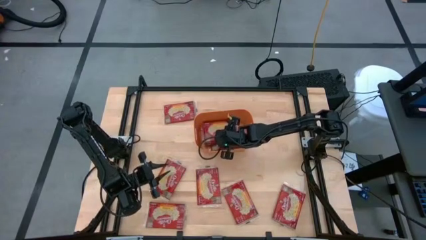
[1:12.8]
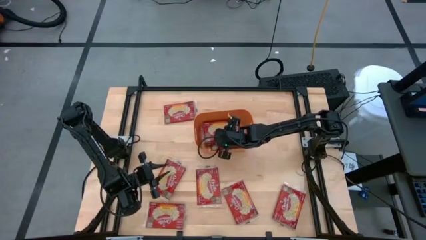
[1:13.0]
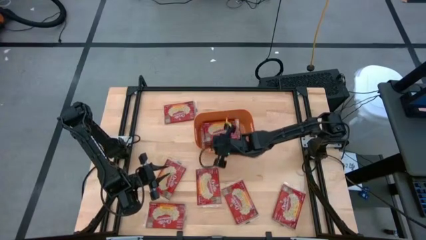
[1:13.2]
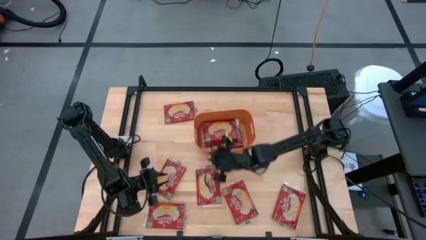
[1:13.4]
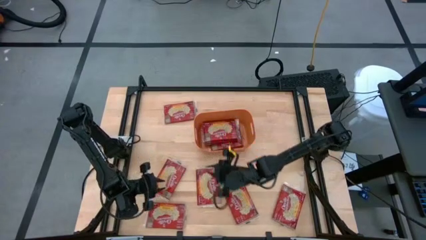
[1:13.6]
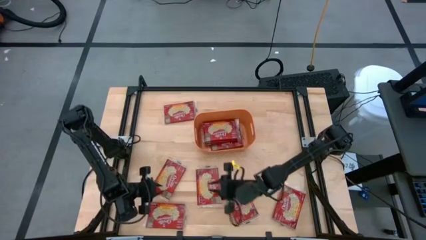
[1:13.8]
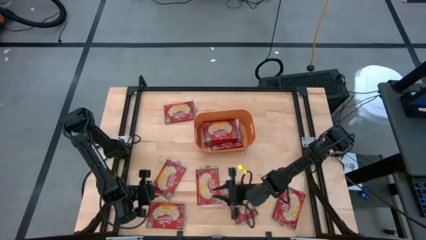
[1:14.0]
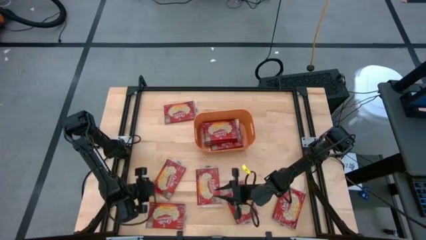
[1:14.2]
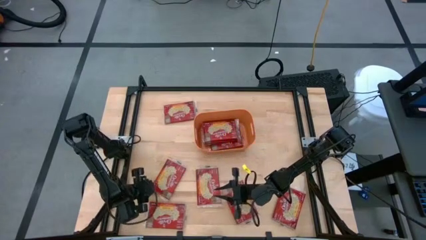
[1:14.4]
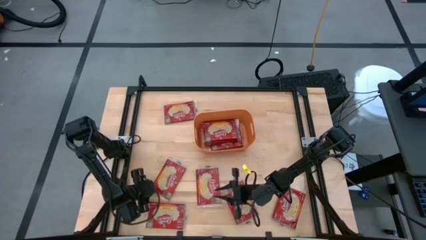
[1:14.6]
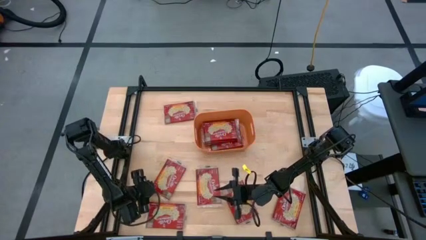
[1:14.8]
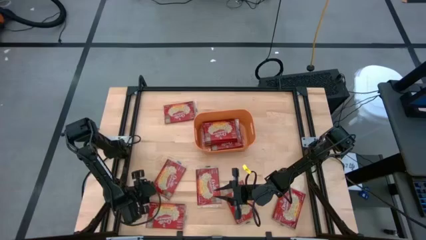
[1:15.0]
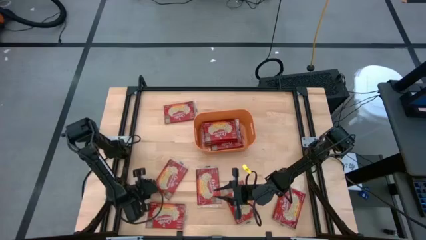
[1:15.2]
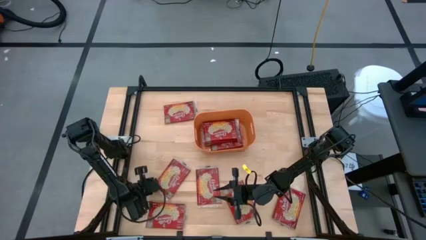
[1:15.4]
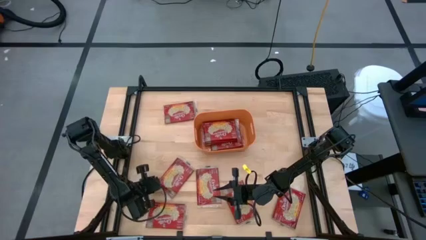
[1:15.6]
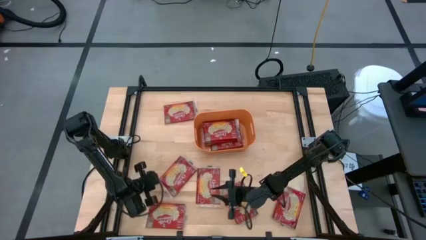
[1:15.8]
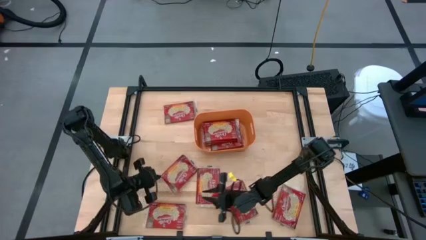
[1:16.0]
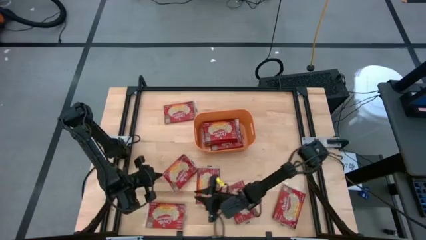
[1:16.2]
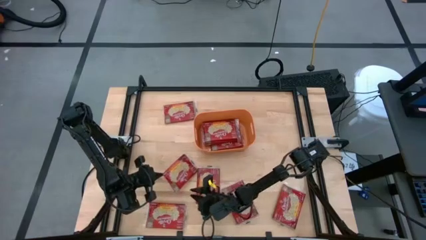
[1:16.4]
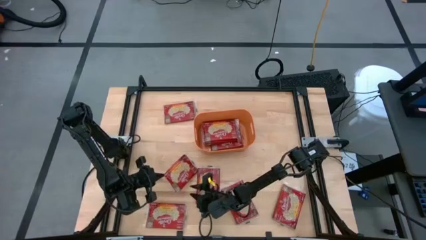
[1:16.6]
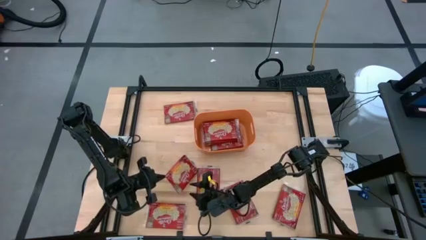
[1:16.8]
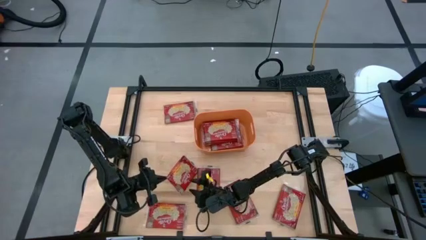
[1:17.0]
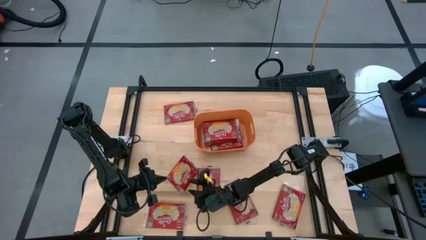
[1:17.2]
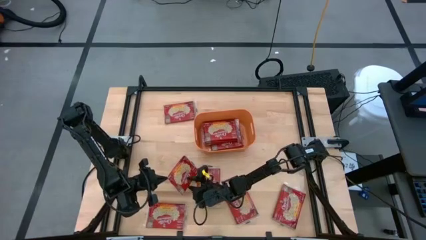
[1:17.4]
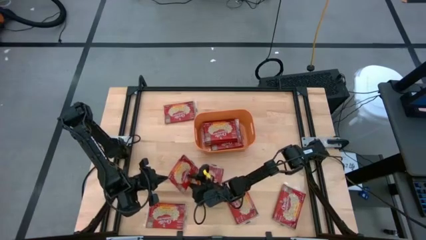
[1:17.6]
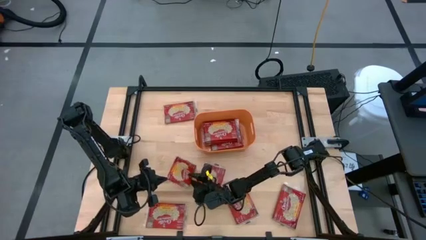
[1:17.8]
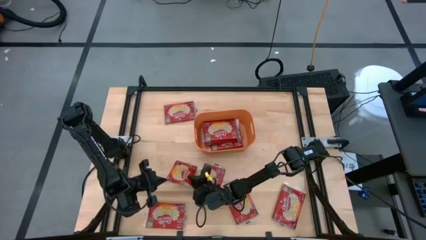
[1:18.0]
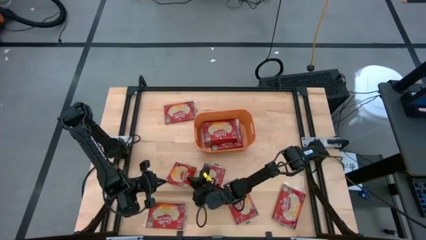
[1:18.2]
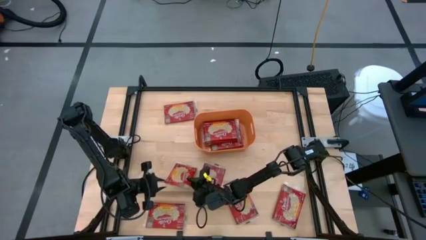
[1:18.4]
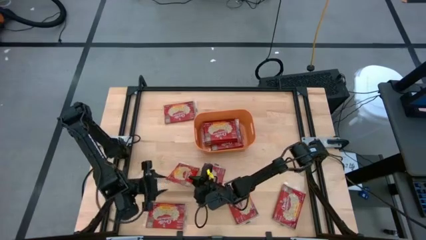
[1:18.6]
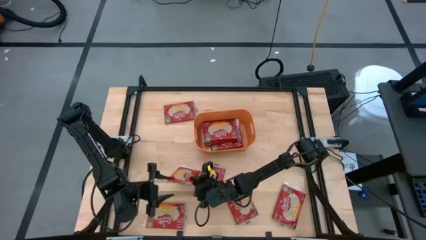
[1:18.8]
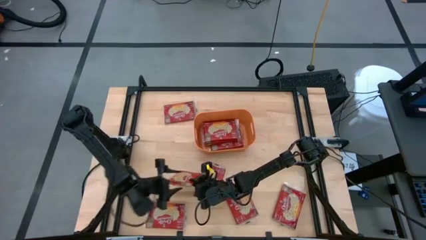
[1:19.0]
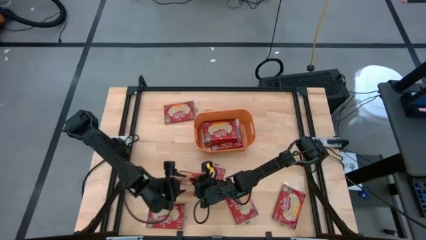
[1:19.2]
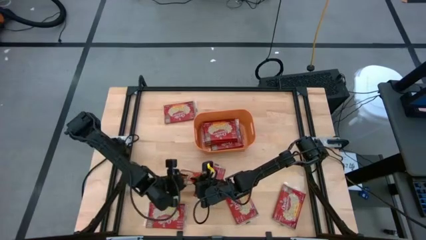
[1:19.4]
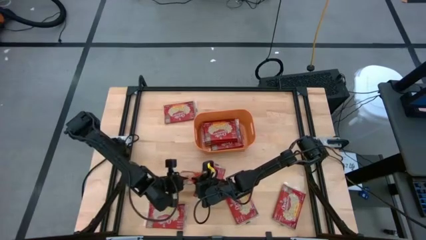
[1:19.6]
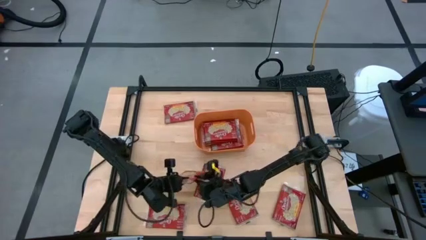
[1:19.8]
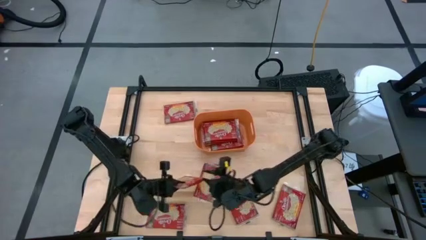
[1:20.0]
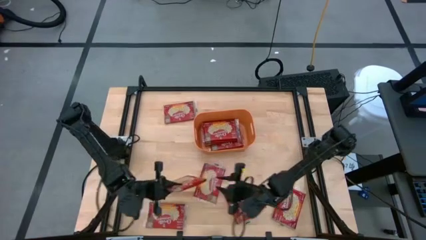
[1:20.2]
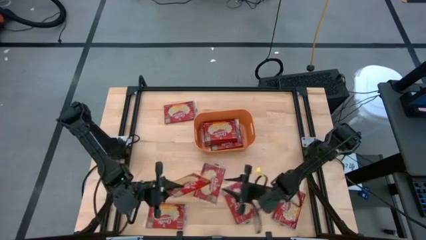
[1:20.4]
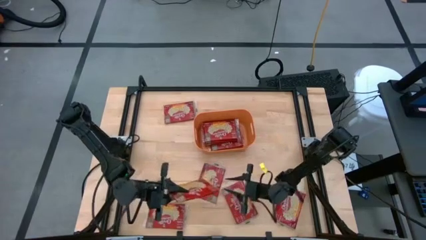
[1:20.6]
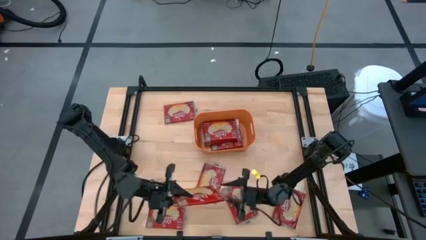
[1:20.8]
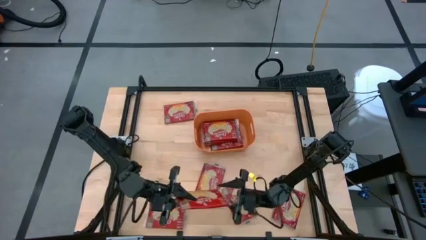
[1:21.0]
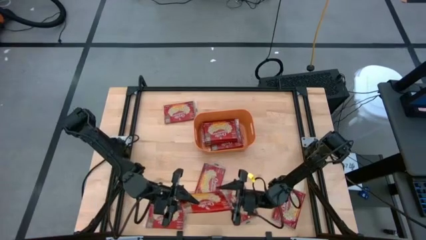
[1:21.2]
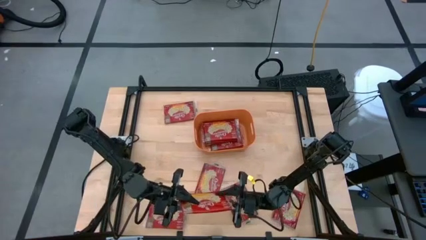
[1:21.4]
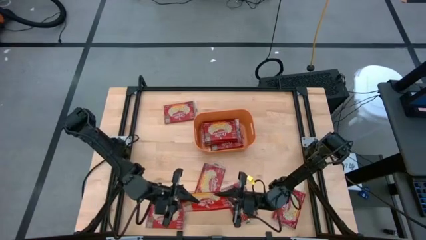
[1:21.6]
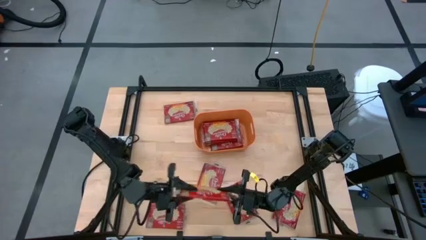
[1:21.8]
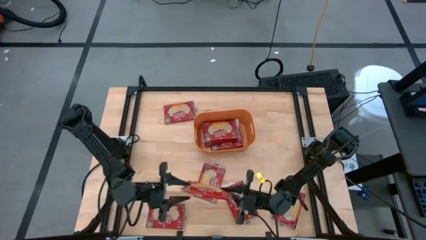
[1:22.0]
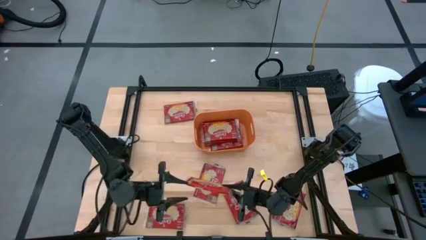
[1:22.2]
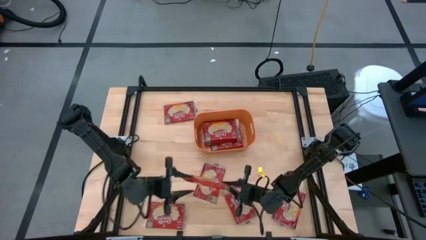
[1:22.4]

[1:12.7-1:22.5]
Task: Sort popcorn bags into baskets
Put the red popcorn bag into the orange bin

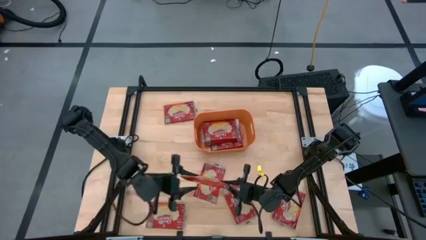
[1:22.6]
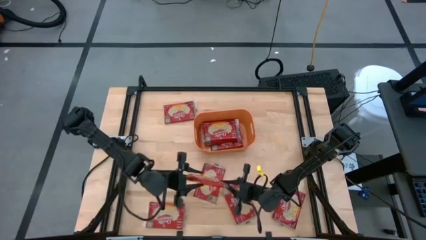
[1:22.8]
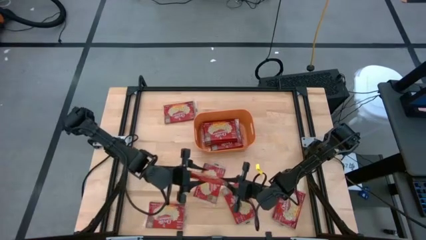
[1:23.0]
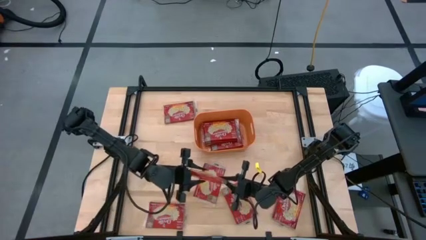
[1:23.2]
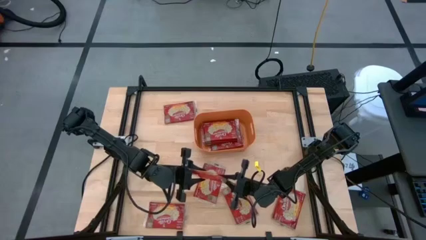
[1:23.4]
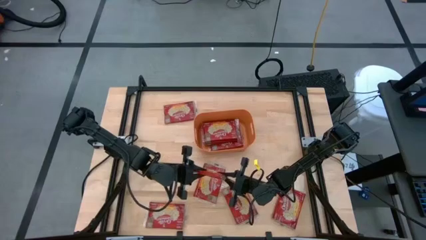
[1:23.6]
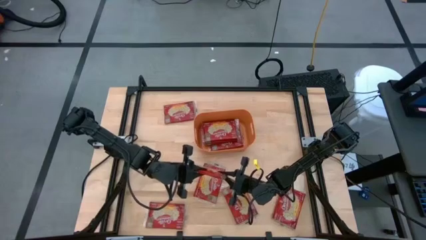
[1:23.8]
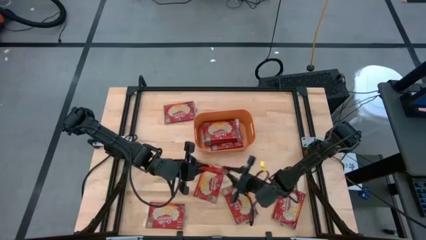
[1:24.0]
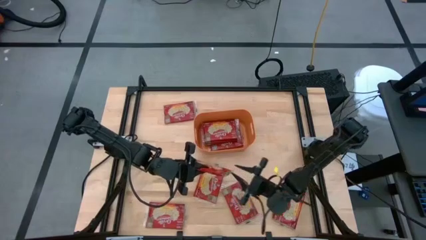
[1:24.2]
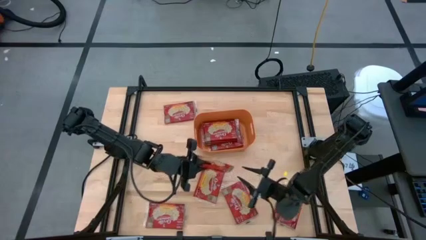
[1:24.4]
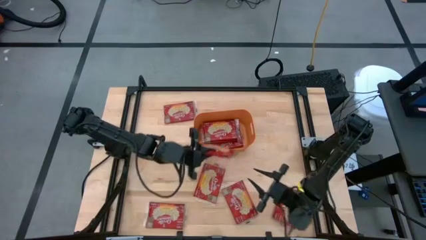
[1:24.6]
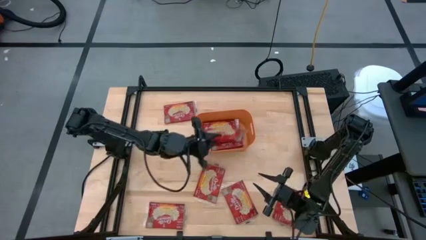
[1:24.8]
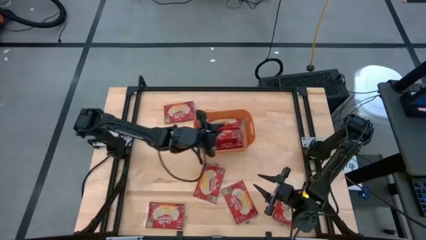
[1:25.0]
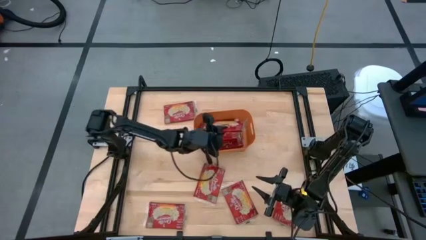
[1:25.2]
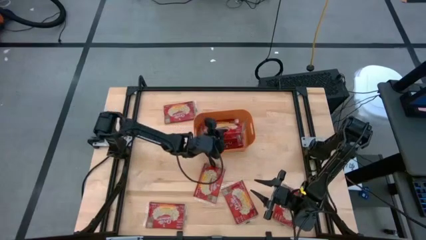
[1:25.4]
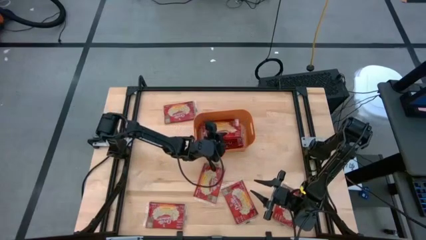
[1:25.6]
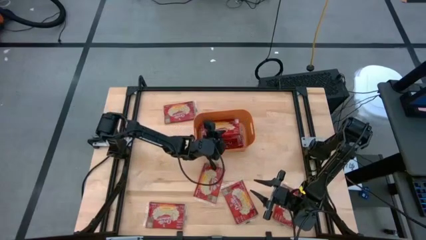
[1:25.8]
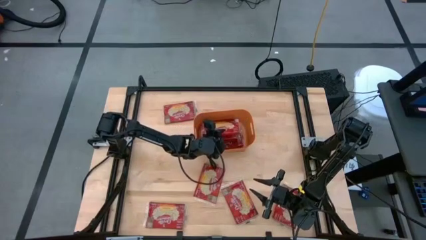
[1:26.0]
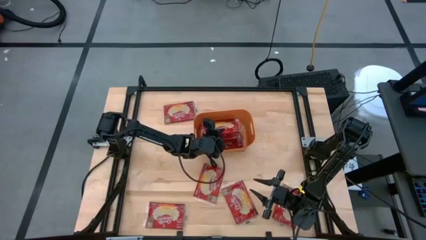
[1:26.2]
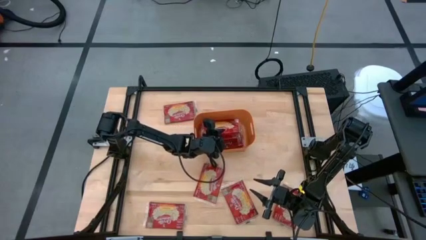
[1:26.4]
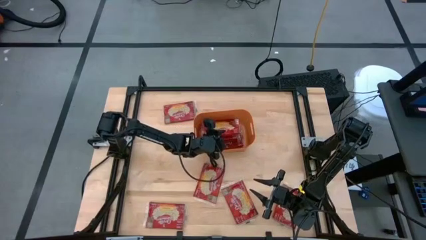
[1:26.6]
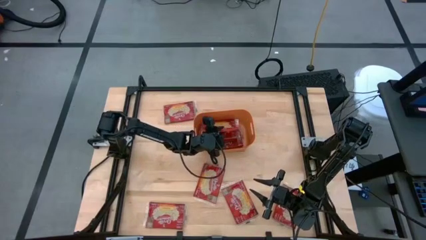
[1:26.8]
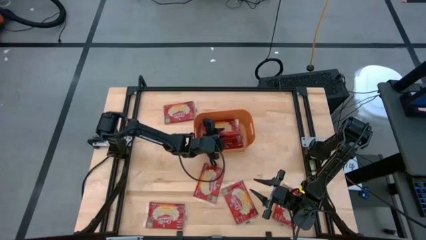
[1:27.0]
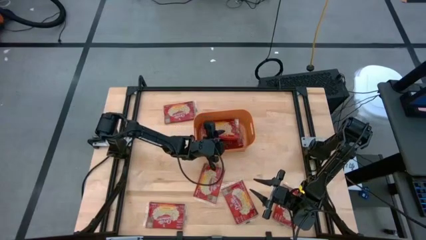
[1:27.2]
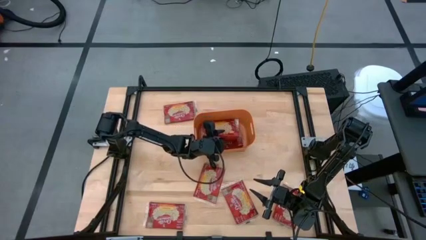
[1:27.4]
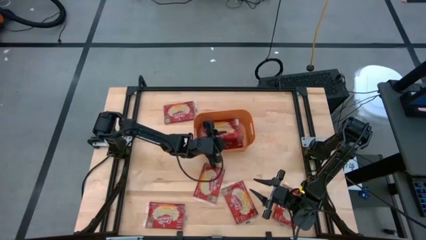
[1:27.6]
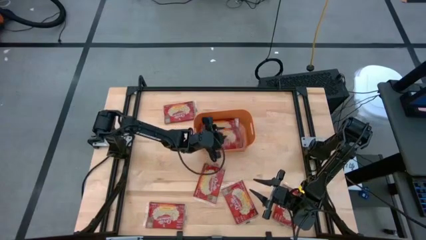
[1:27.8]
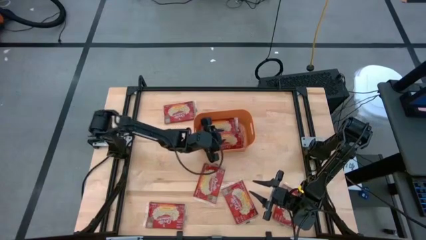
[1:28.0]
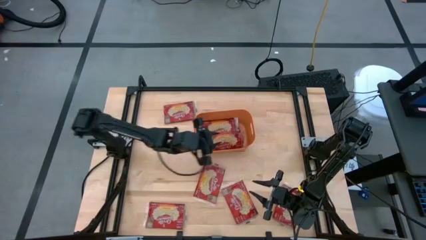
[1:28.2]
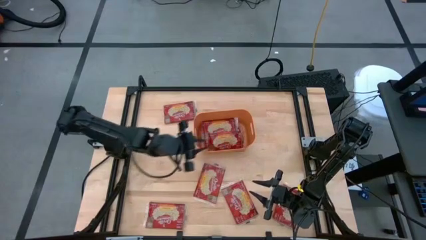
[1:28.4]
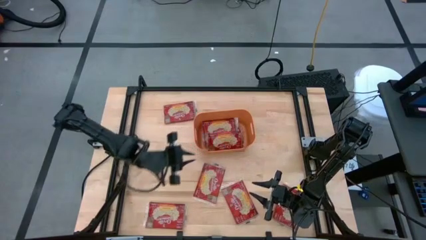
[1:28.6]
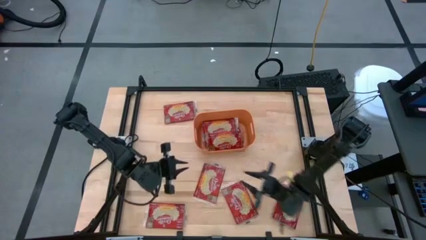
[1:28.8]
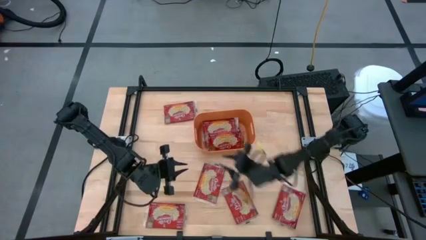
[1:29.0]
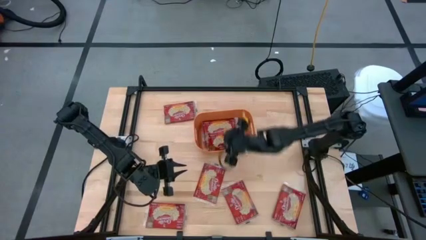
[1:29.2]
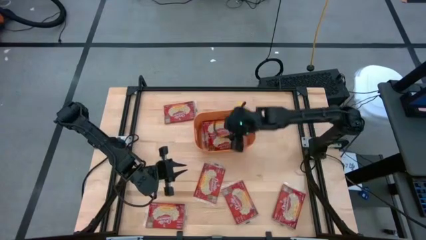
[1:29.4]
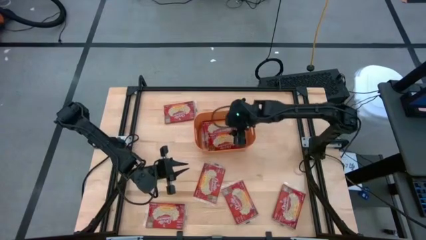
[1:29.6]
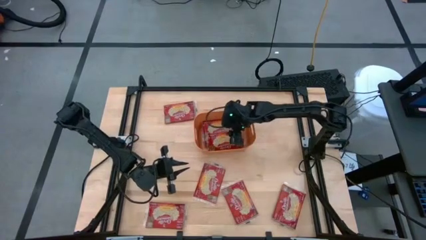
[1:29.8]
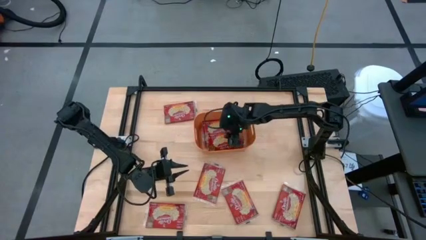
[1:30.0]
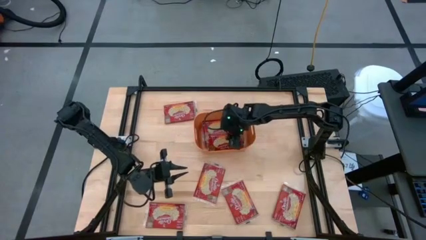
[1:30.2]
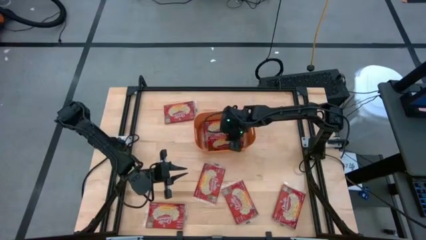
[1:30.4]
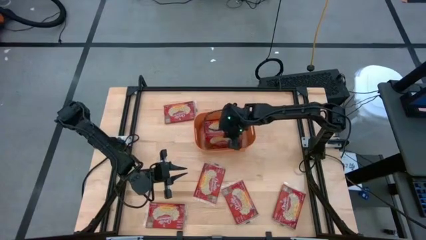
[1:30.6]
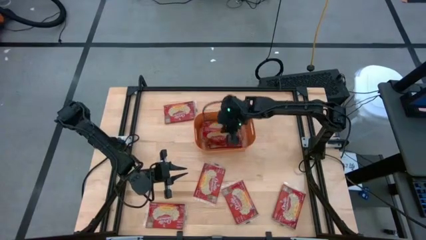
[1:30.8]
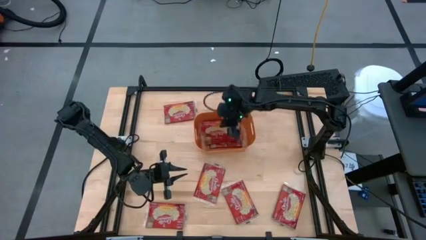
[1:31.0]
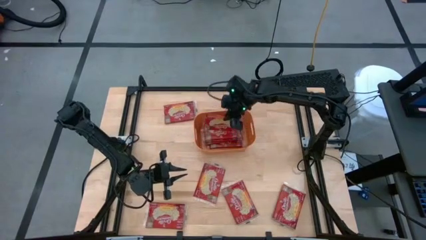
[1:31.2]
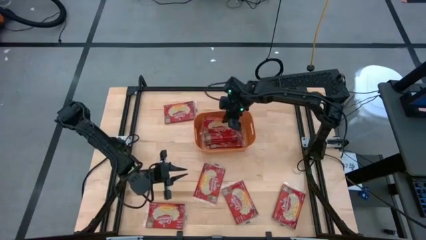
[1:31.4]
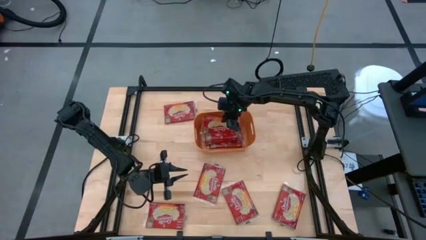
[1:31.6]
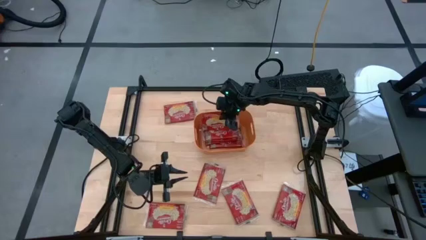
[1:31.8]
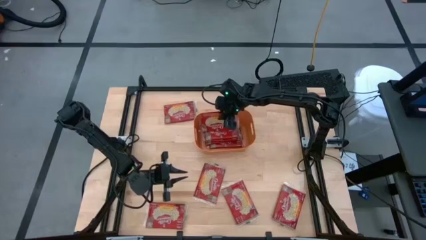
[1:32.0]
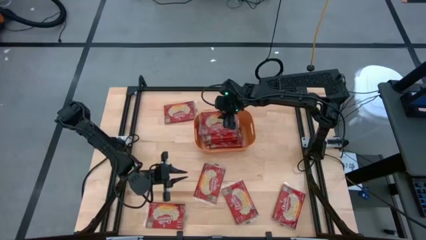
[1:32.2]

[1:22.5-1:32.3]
Put the red popcorn bag into the orange bin
